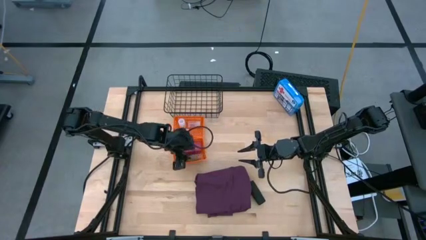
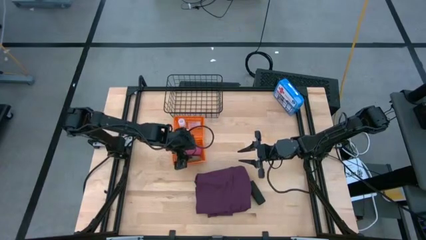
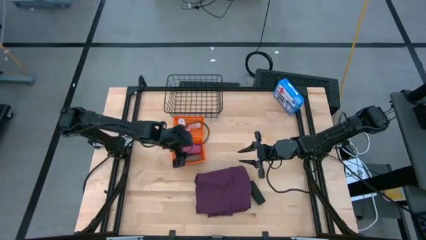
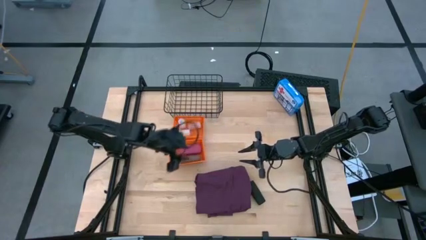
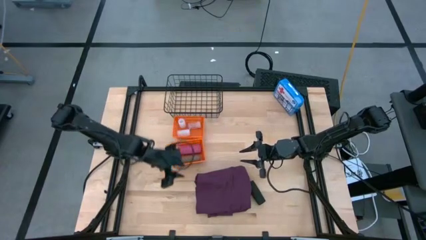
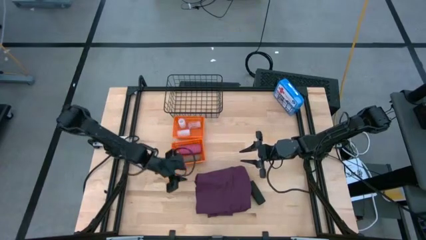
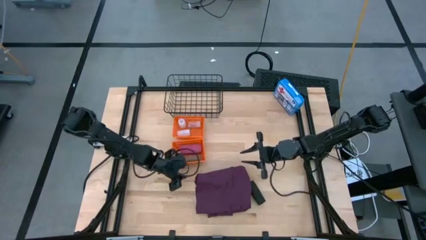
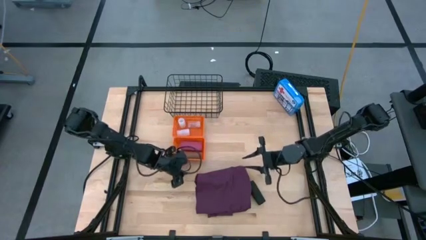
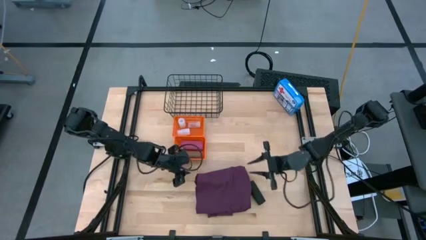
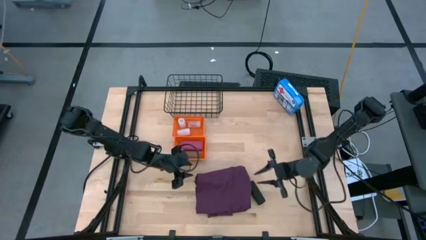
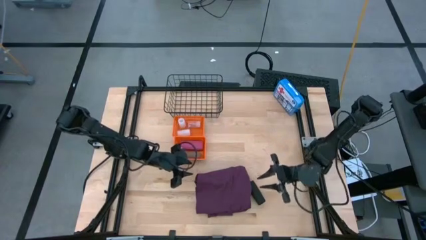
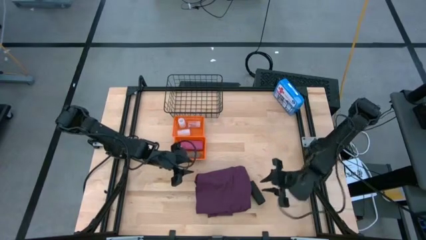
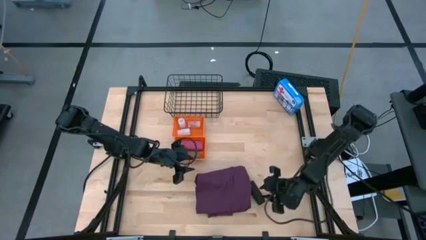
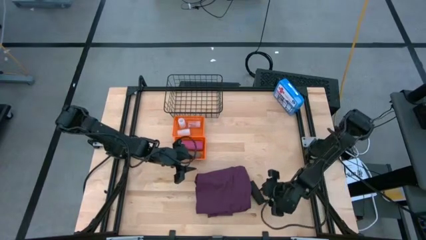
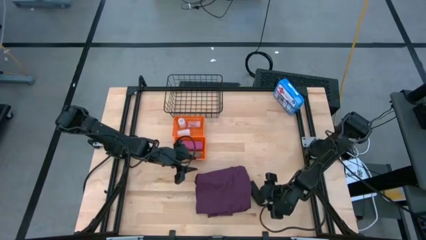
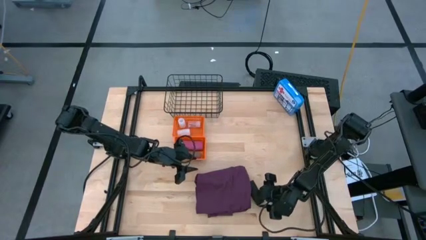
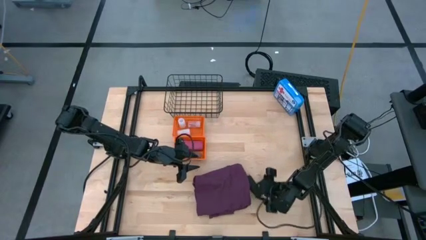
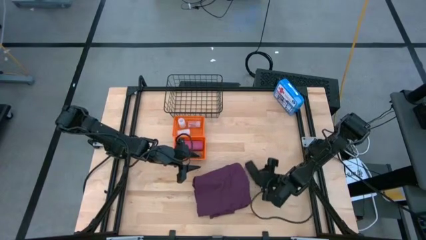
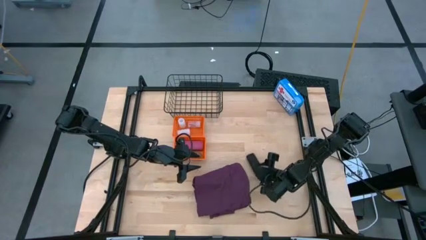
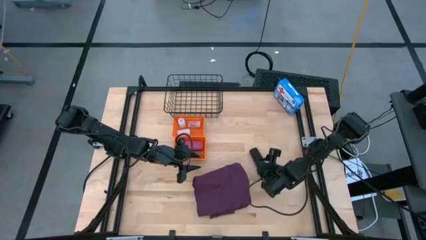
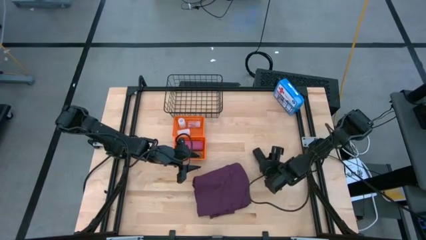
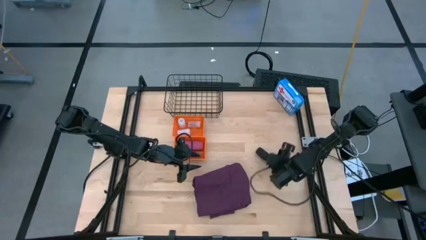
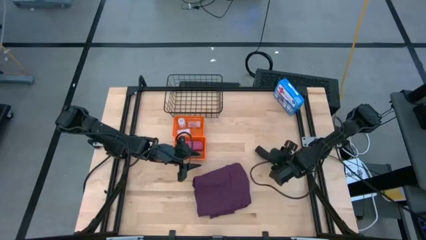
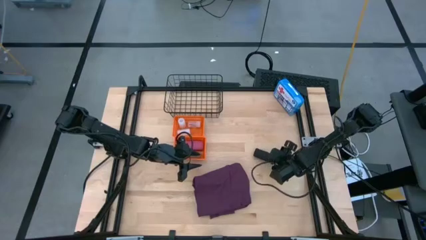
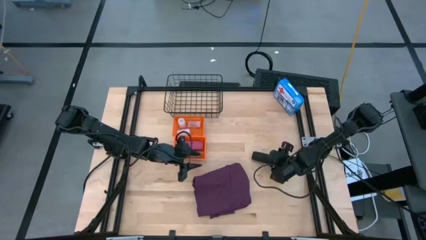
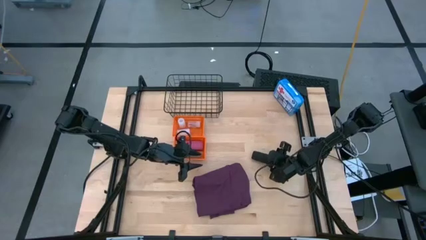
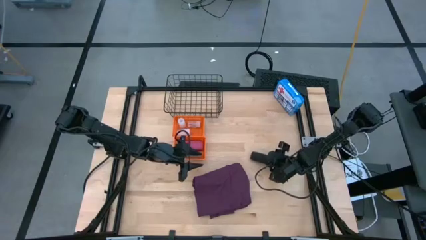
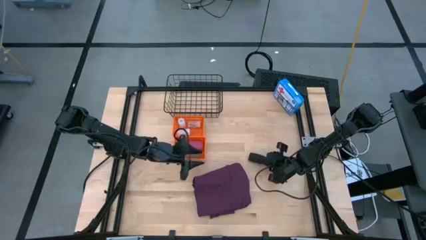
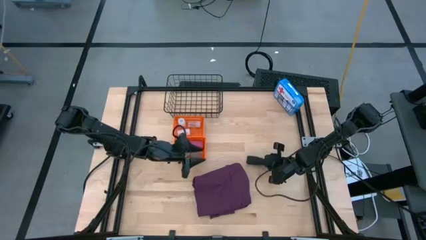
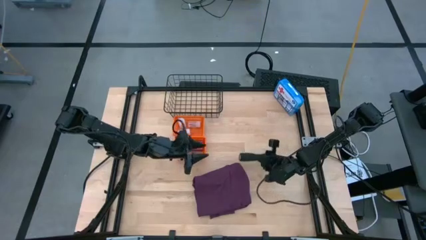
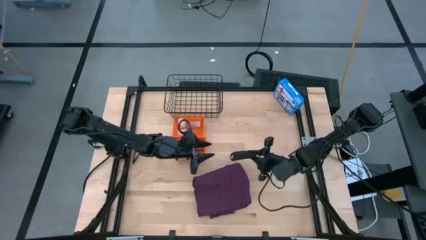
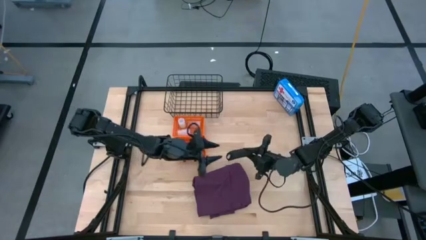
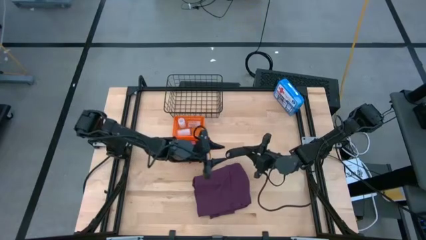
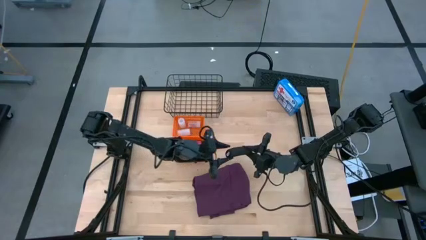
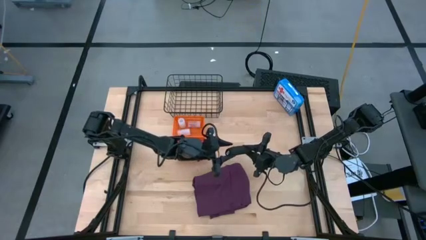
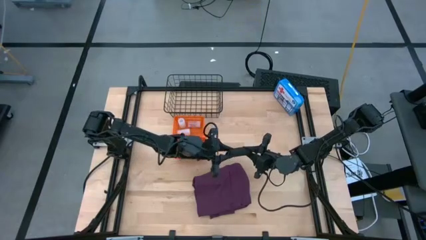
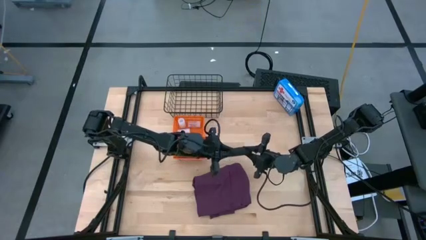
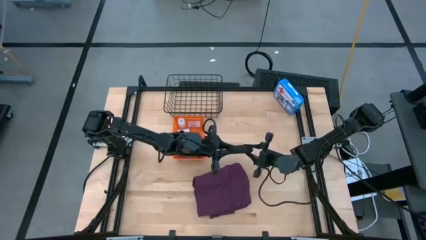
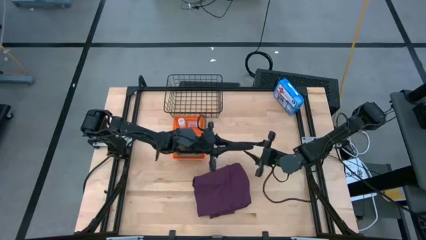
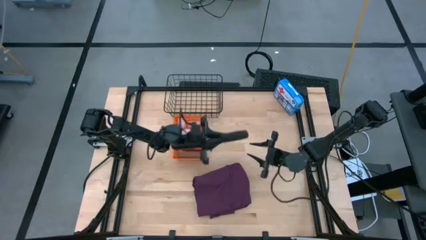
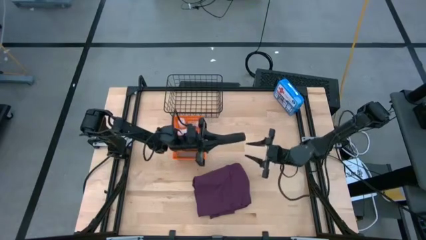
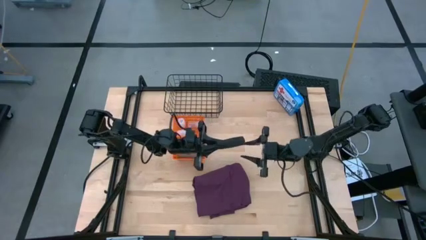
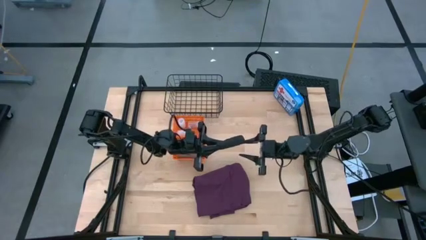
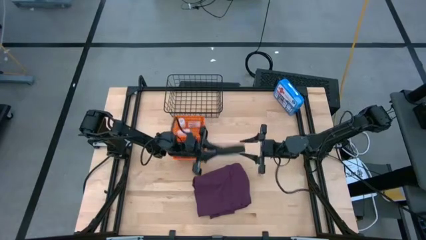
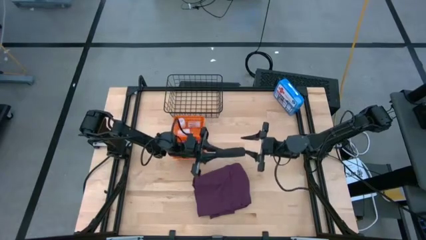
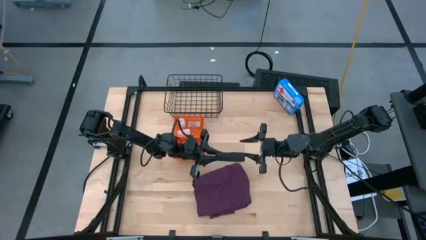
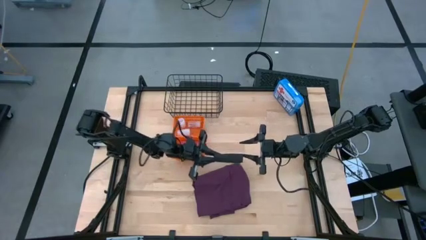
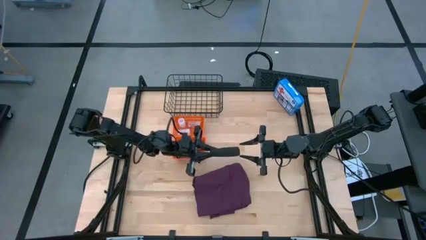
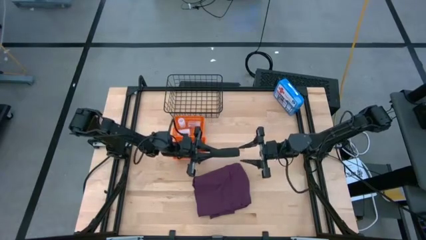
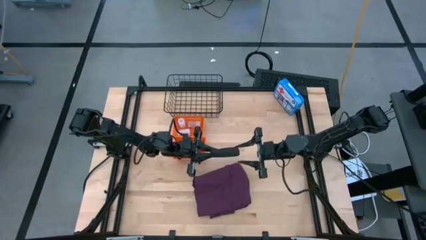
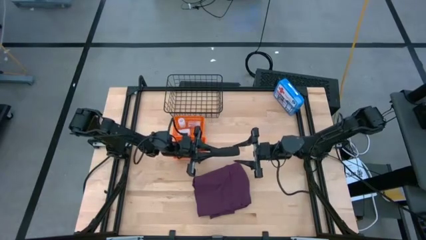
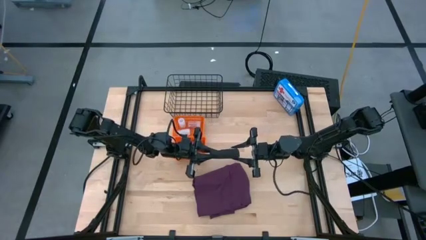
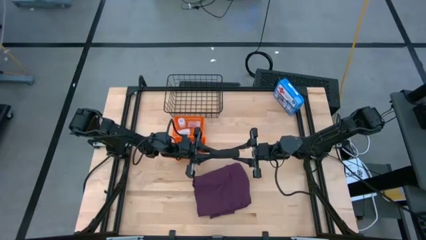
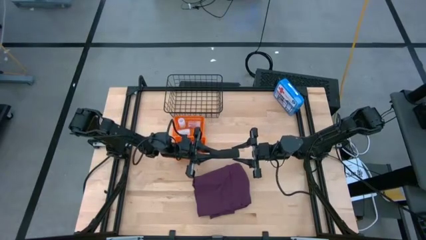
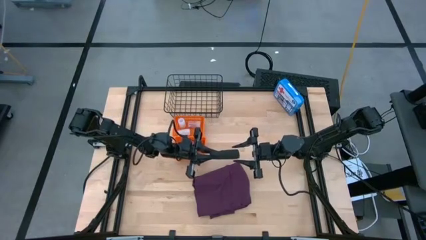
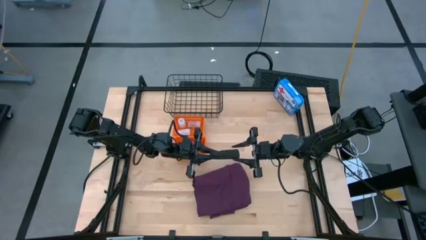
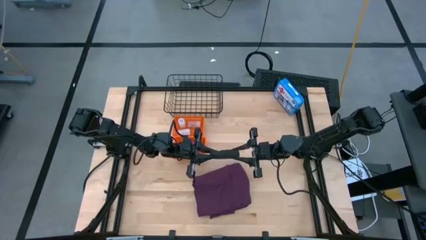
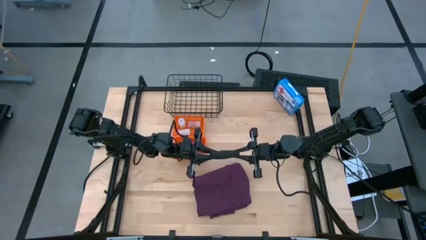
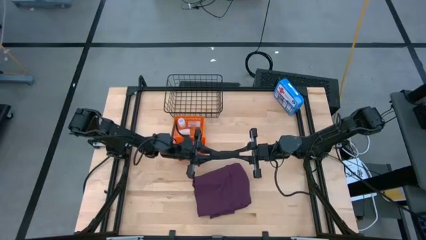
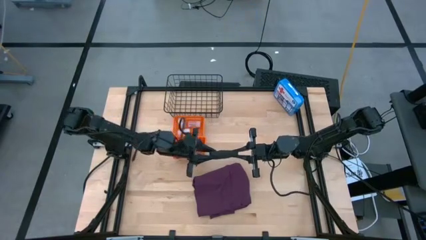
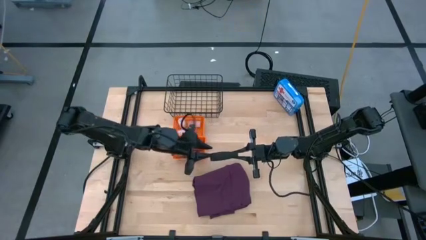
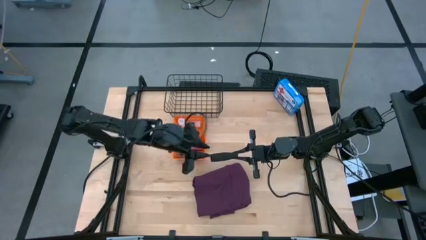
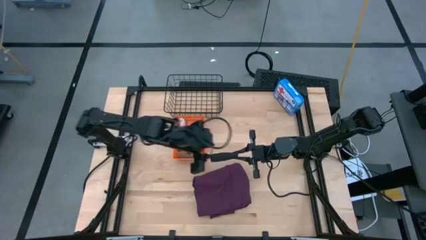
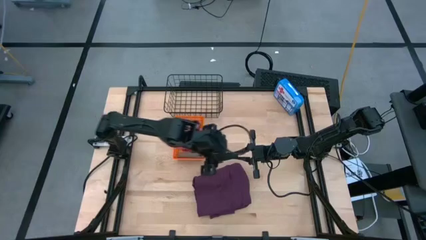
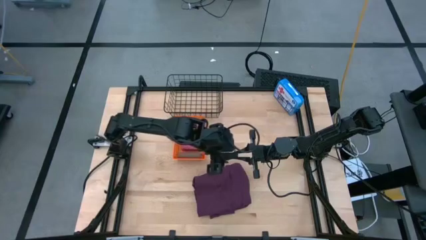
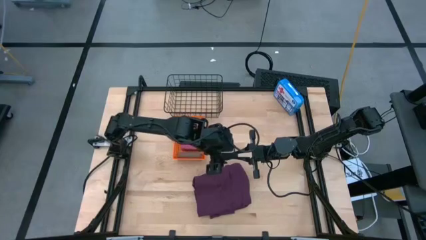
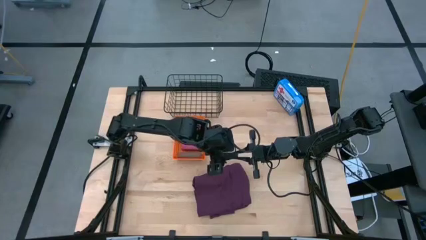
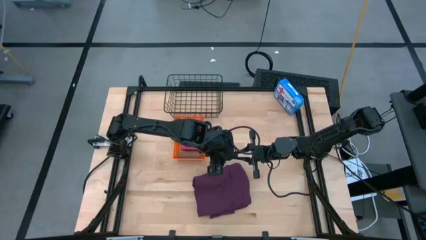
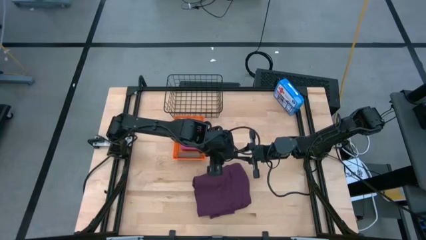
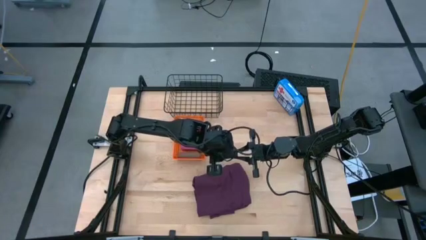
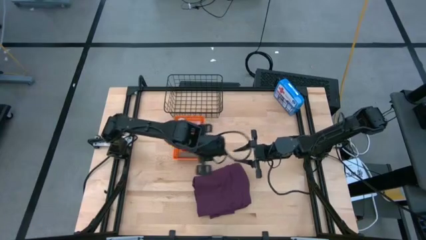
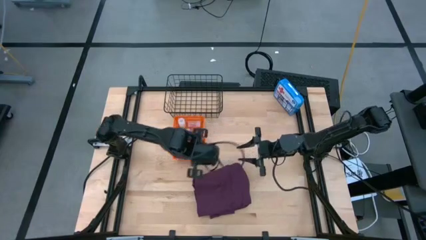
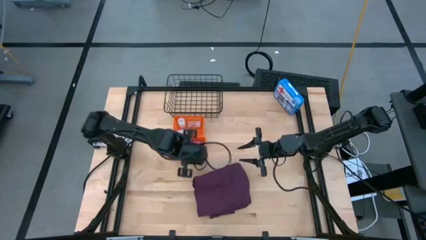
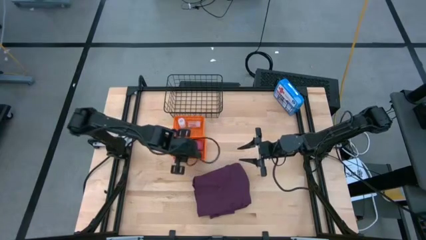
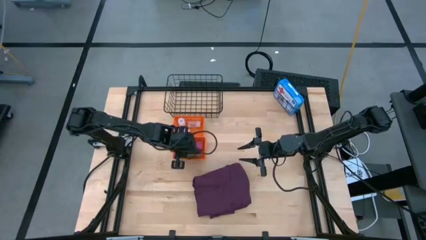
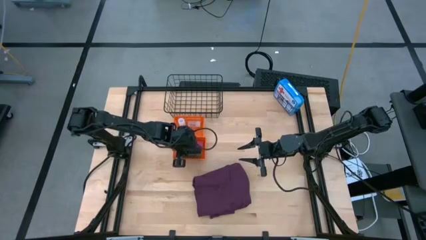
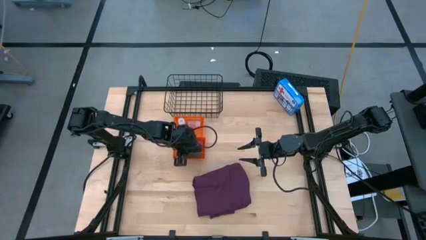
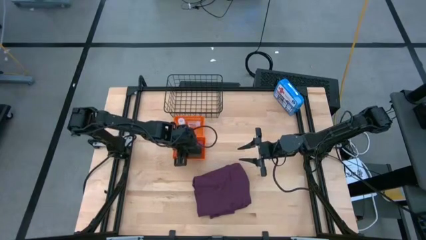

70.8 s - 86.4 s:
Task: Pick & place medical supplies in basket/bin
Put the black bandage into the bottom orange bin
